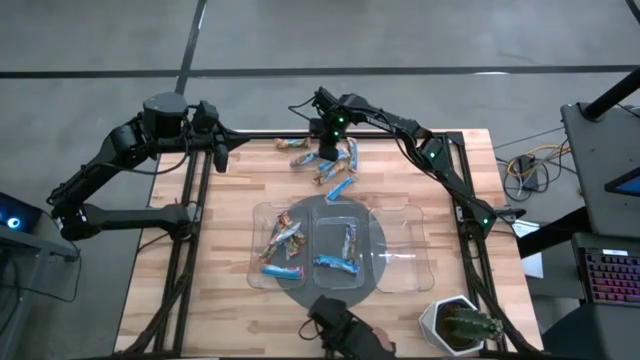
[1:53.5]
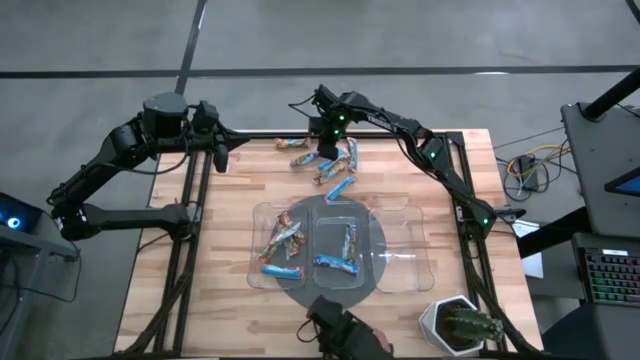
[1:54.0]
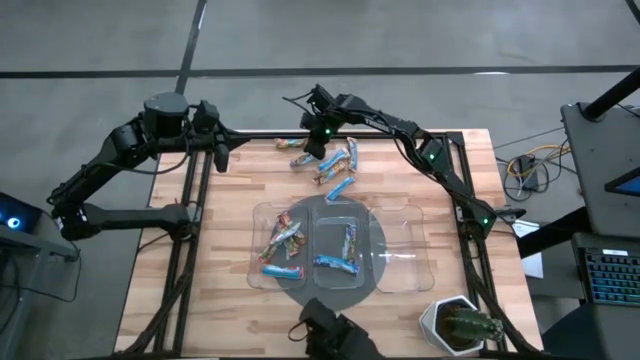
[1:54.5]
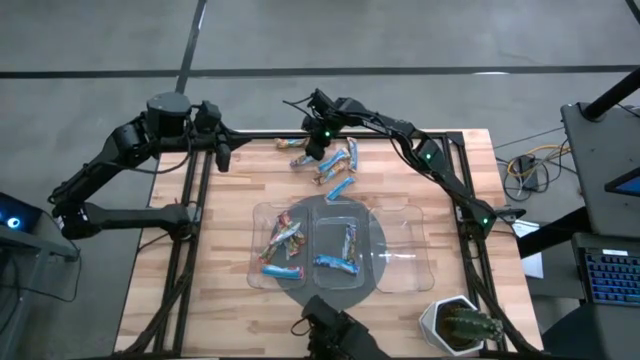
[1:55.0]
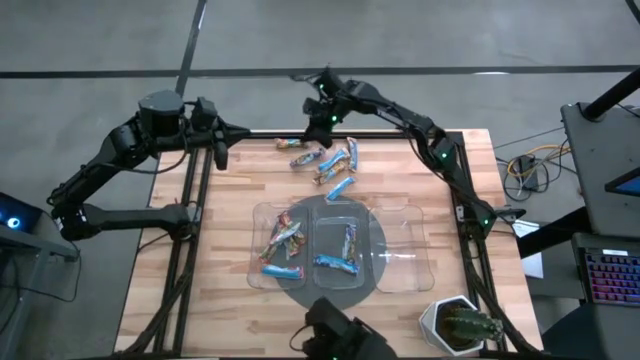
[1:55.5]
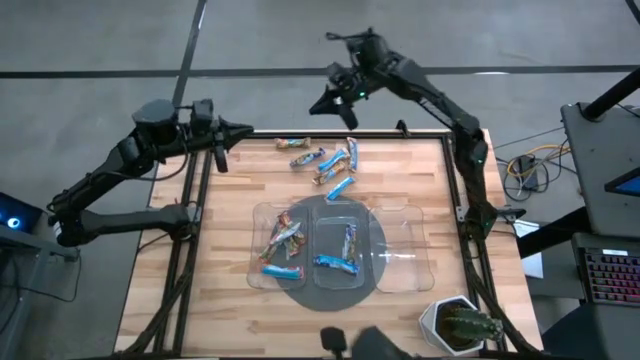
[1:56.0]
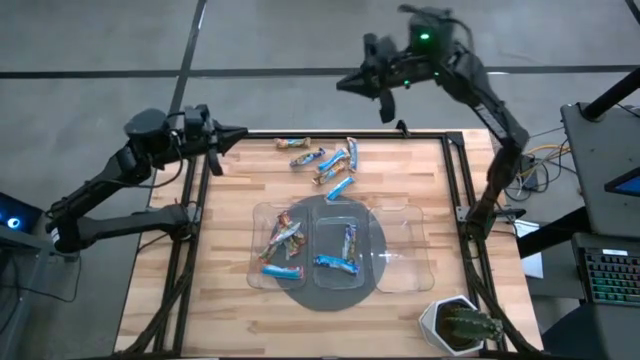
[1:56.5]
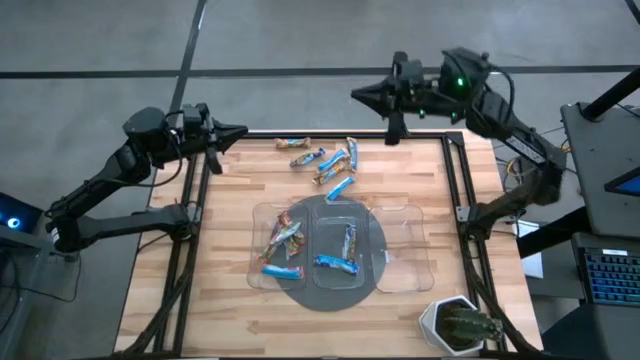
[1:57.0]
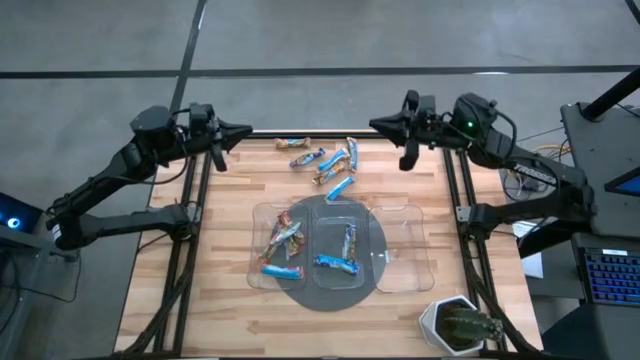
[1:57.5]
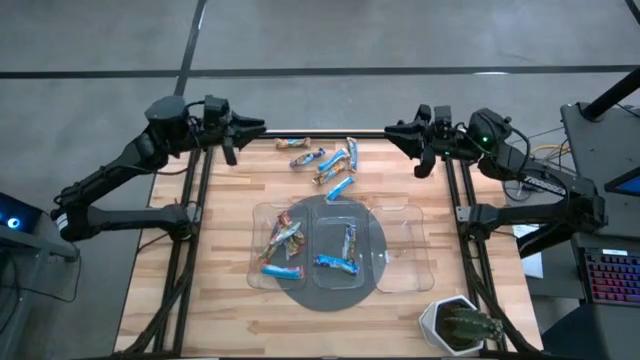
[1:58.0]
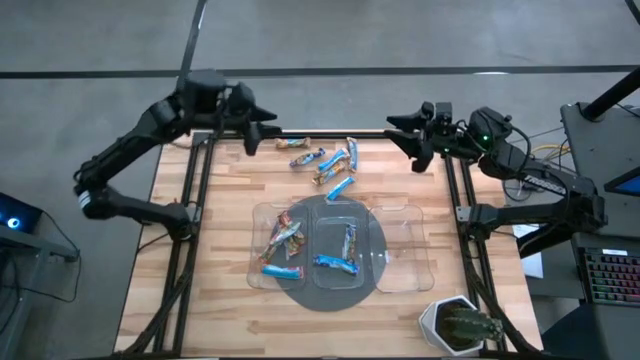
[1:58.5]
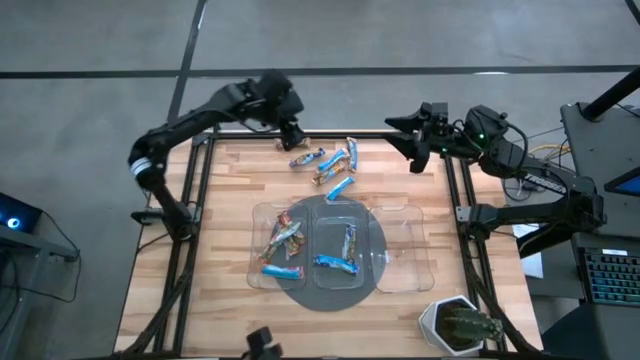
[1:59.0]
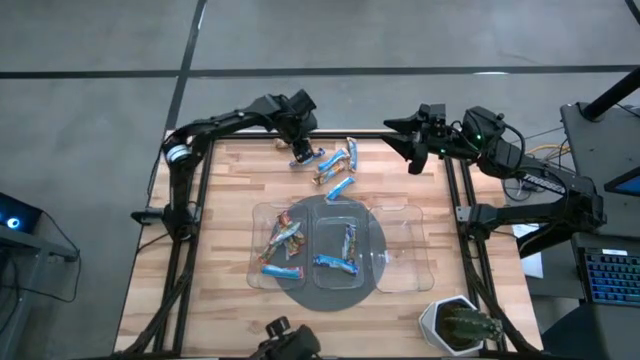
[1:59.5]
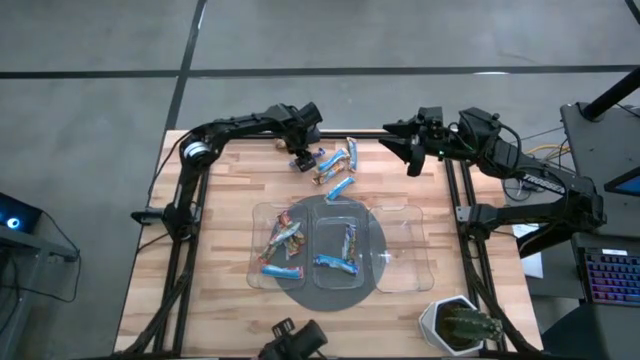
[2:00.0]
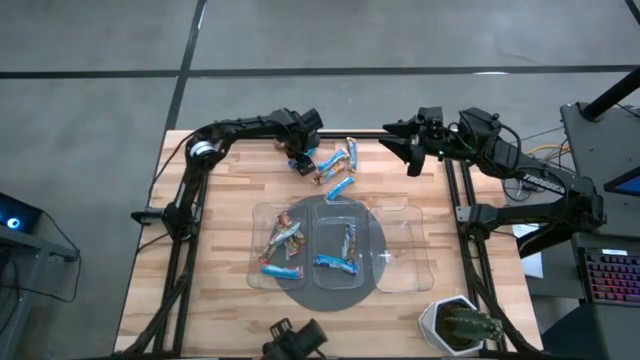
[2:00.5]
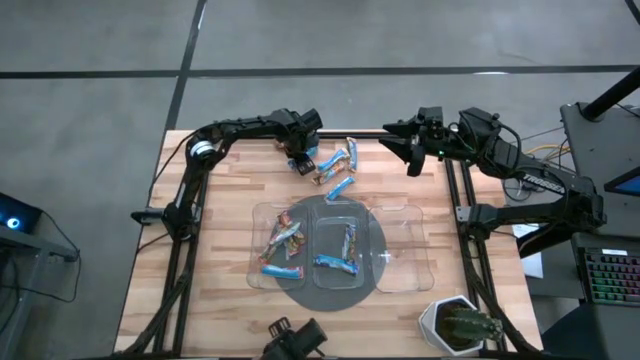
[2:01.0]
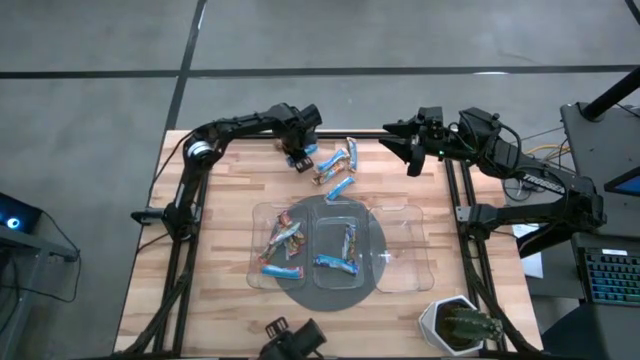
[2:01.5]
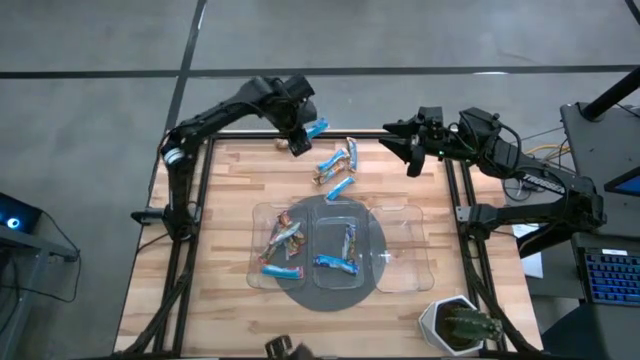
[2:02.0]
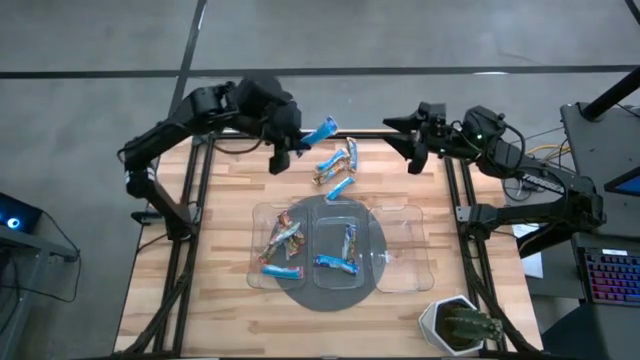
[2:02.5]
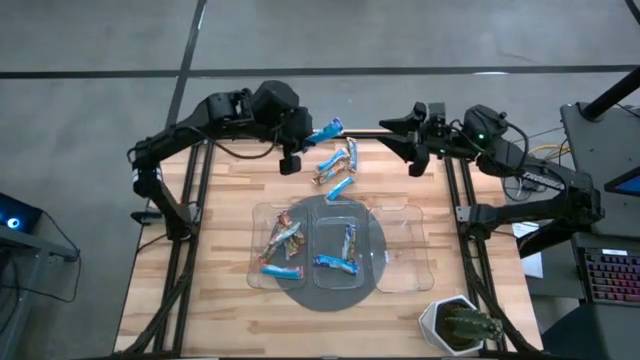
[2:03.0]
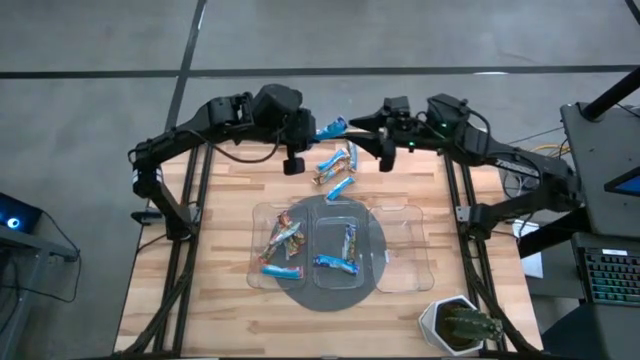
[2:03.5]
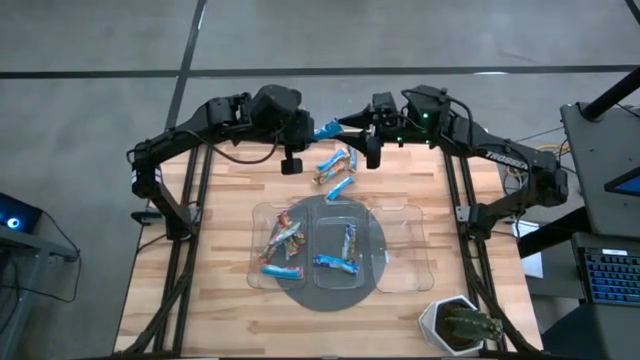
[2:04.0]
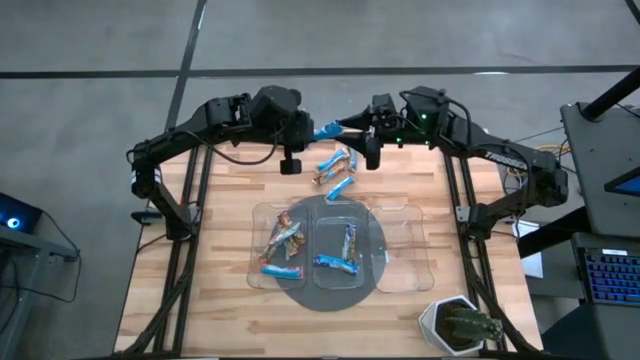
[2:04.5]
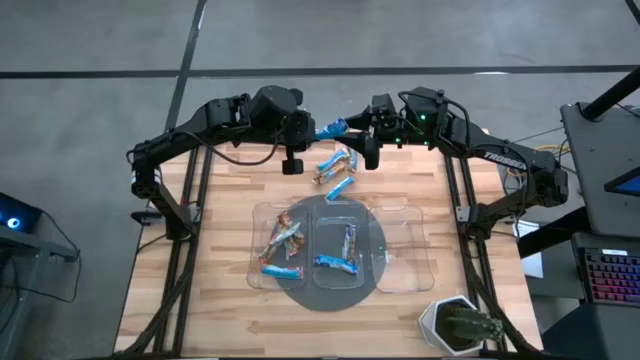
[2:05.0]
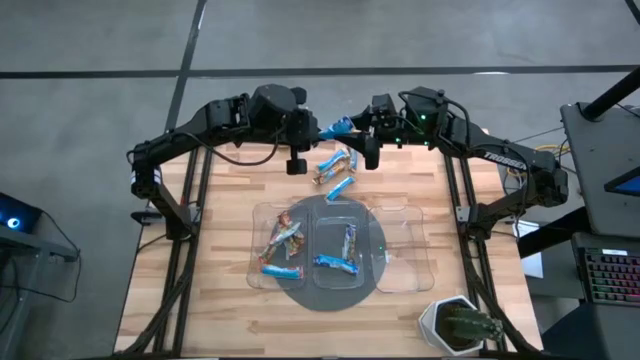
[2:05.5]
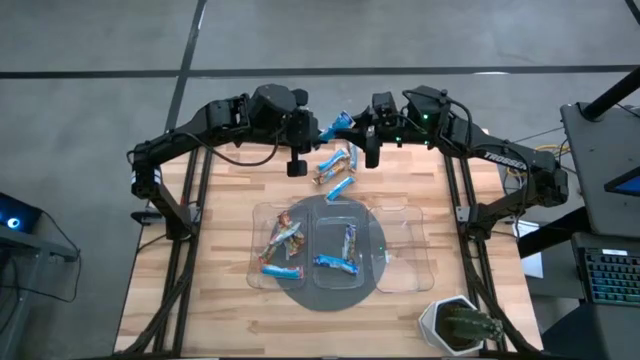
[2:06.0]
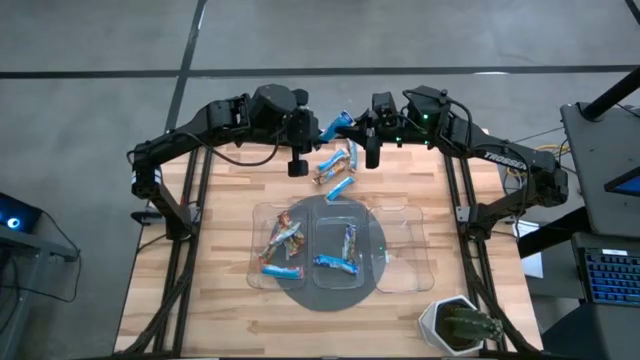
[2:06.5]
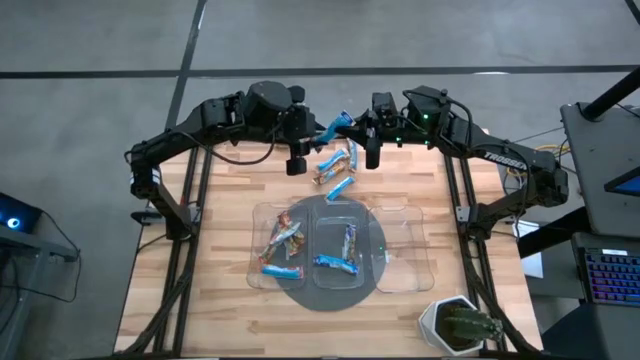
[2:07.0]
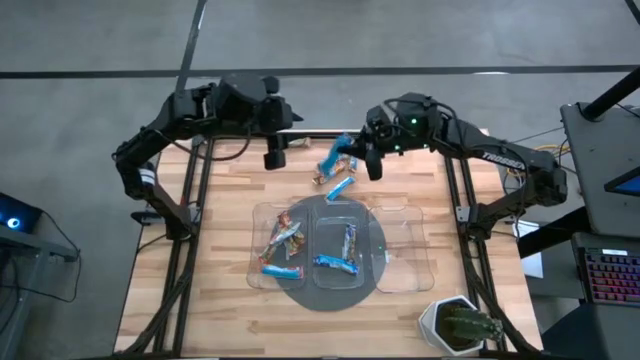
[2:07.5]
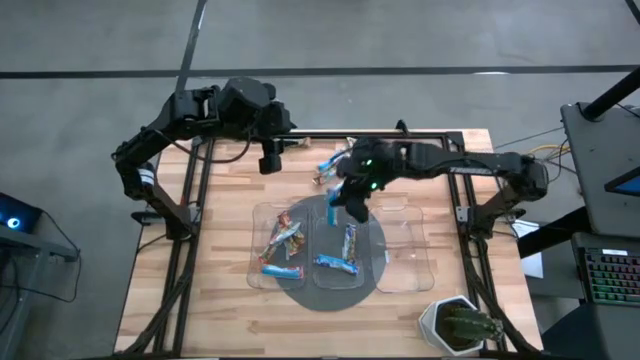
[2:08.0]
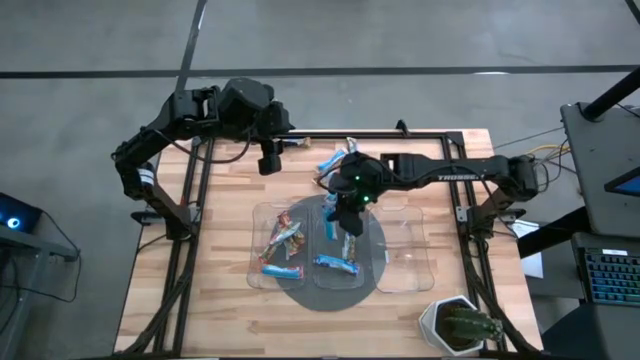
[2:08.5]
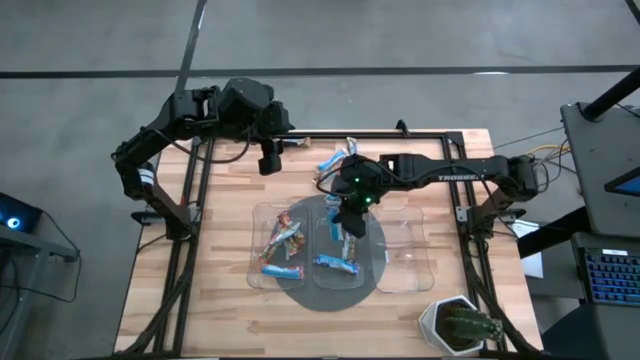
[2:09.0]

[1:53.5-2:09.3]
Task: Pick and place Granola Bars by type
Put the blue granola bar into the middle transparent bin

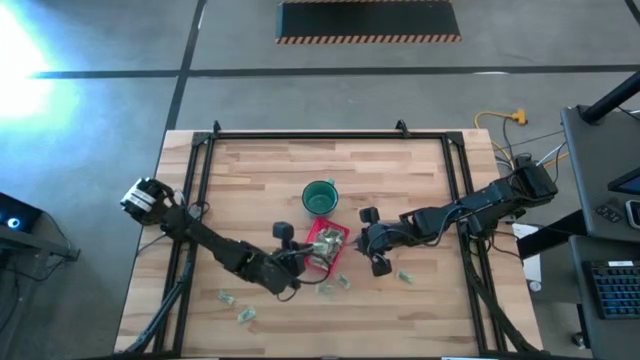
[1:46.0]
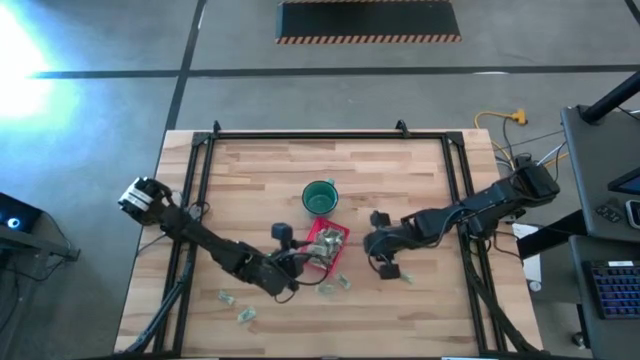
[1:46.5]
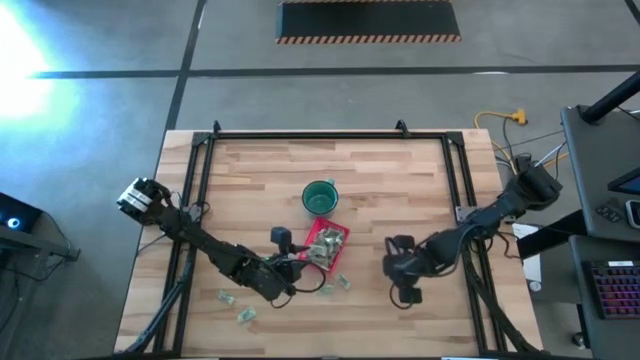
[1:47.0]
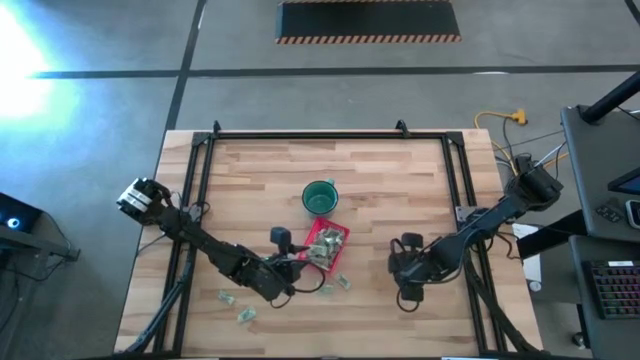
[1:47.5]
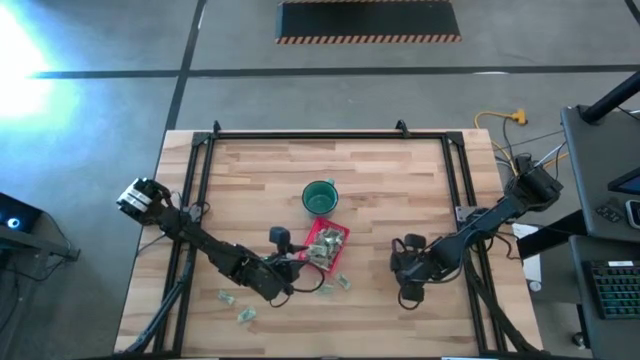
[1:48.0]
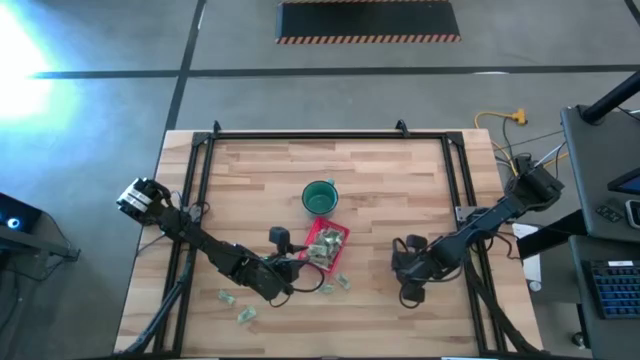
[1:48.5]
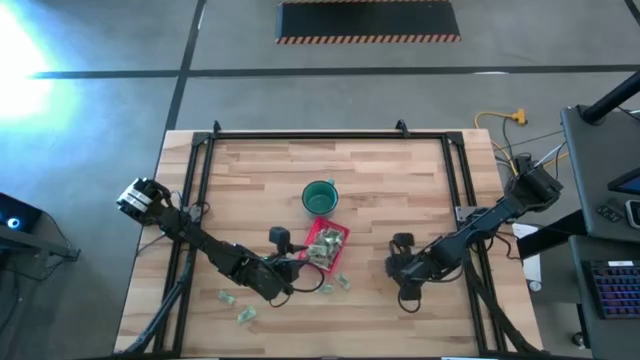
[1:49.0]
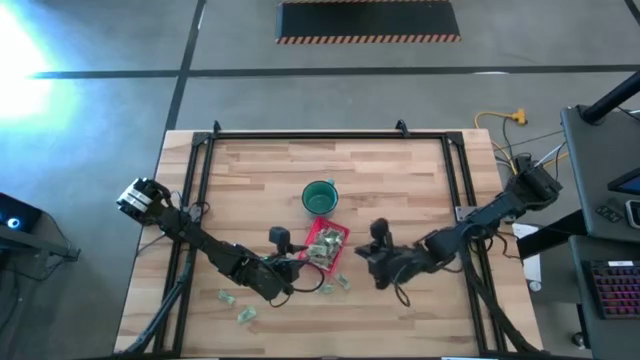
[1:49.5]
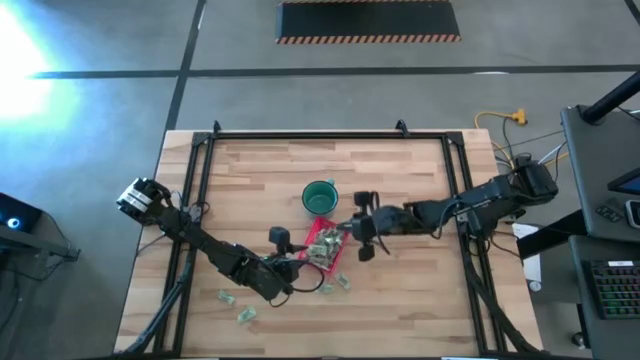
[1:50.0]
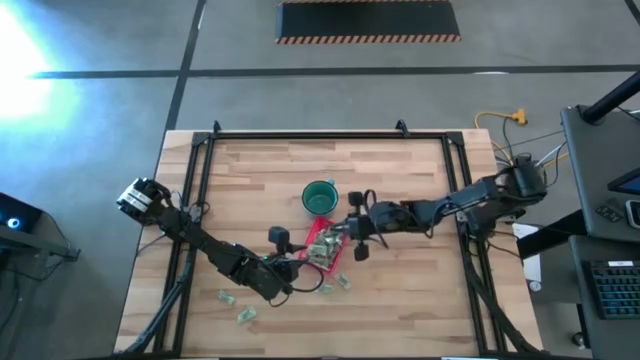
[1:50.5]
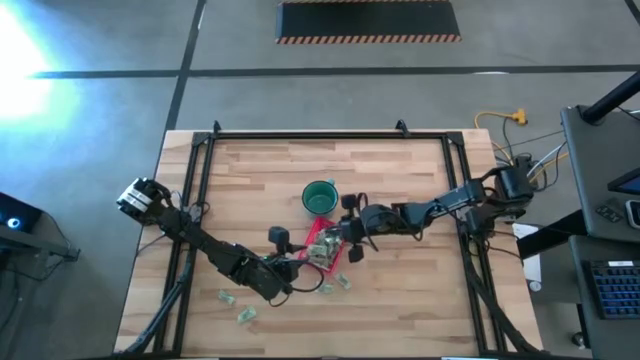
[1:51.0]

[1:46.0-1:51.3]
Task: Pick and place items into bin
Put the light green stevia packet into the red bin
